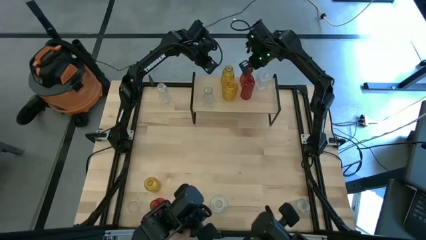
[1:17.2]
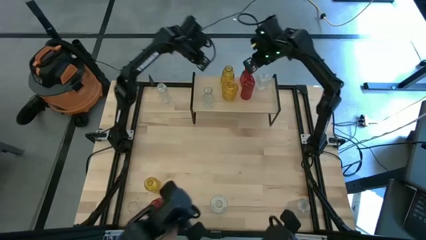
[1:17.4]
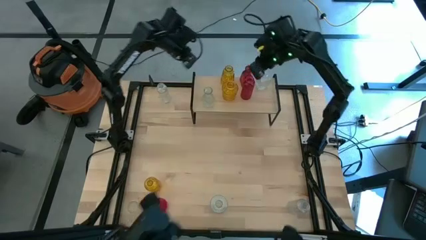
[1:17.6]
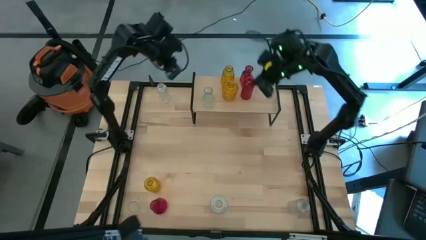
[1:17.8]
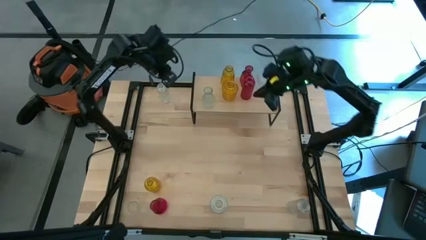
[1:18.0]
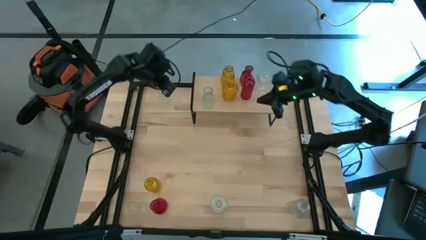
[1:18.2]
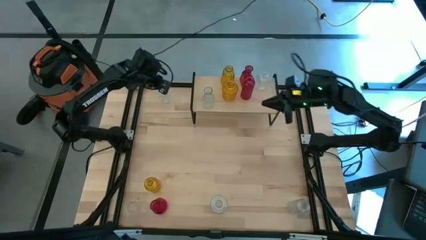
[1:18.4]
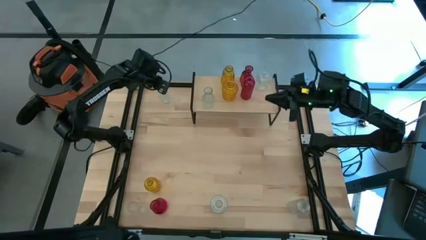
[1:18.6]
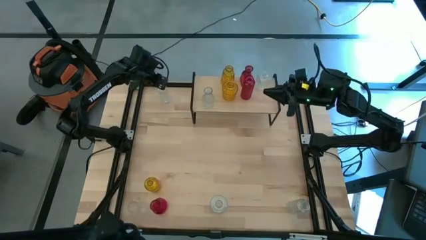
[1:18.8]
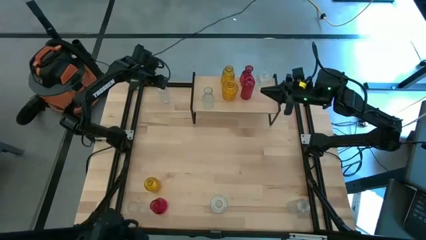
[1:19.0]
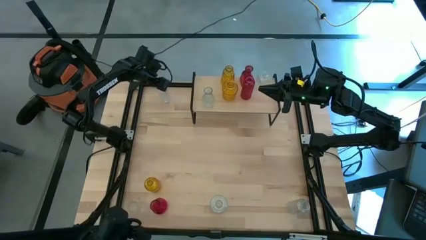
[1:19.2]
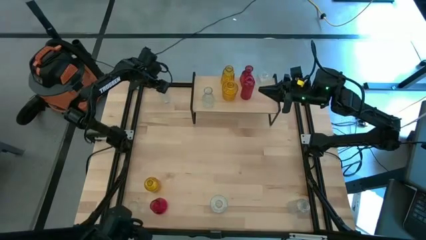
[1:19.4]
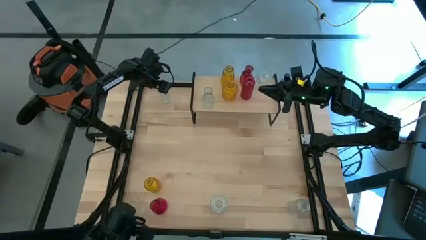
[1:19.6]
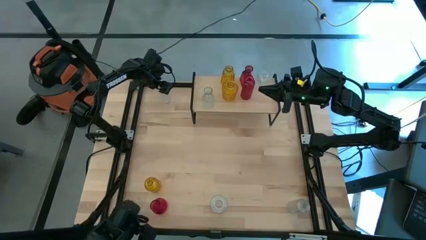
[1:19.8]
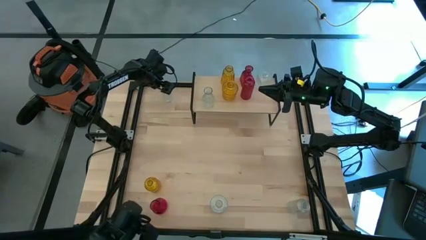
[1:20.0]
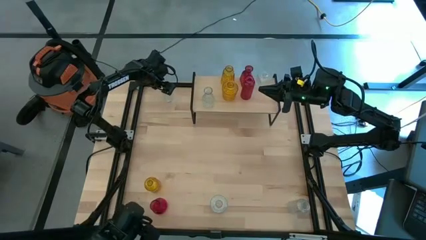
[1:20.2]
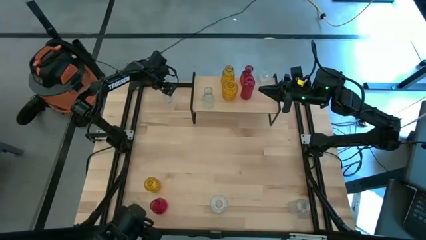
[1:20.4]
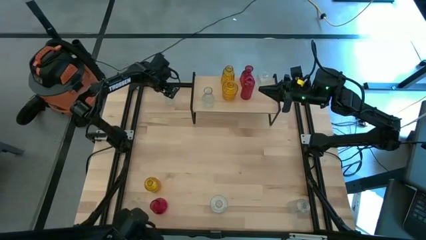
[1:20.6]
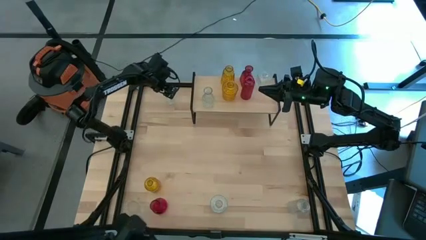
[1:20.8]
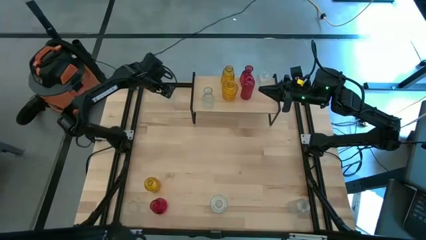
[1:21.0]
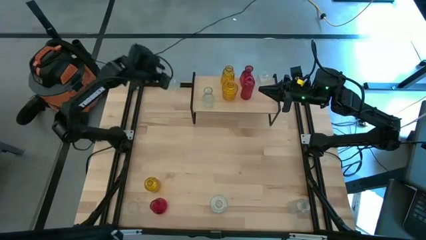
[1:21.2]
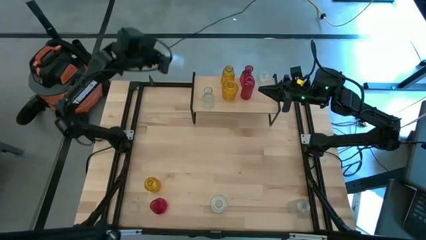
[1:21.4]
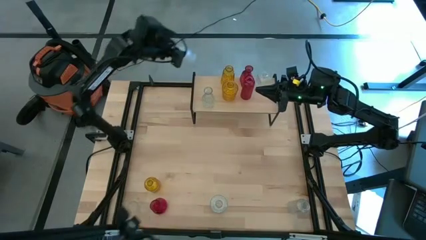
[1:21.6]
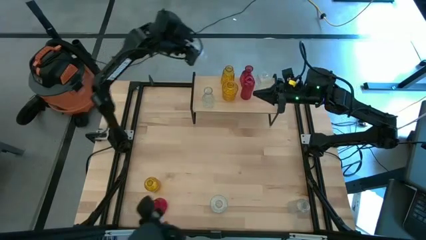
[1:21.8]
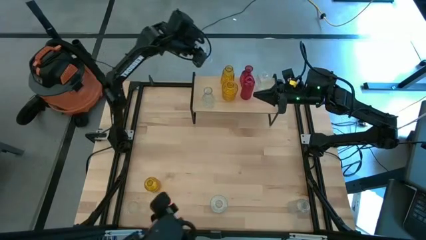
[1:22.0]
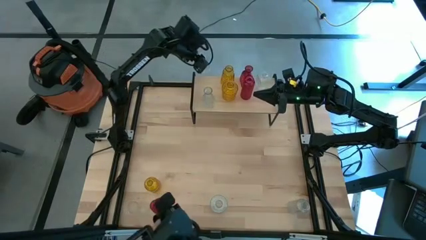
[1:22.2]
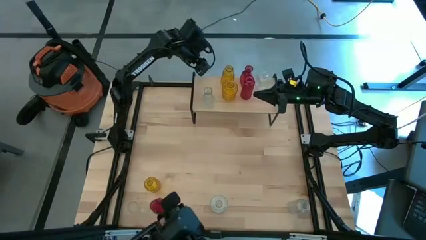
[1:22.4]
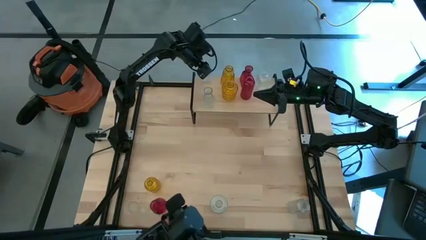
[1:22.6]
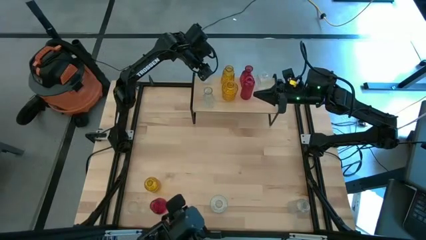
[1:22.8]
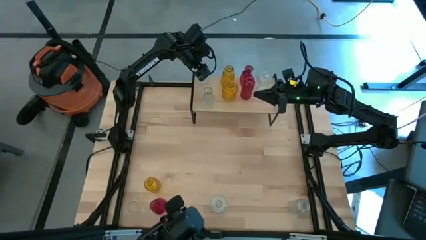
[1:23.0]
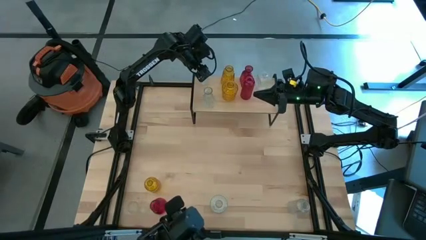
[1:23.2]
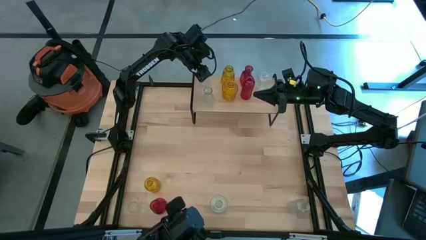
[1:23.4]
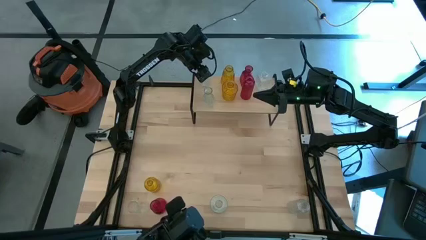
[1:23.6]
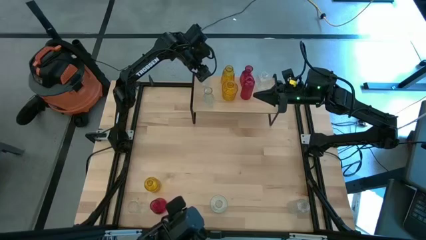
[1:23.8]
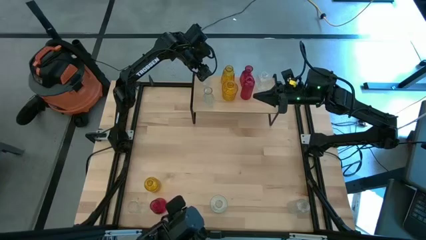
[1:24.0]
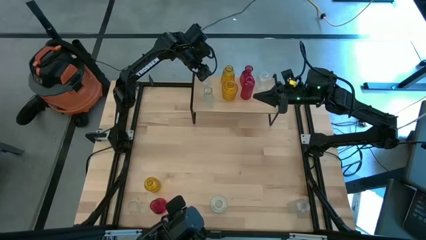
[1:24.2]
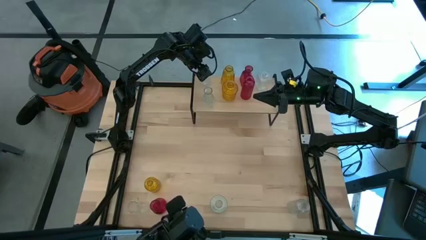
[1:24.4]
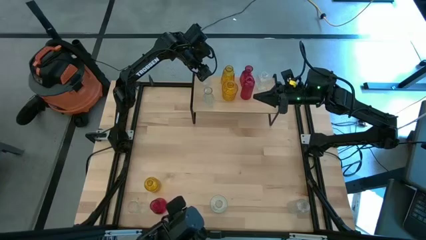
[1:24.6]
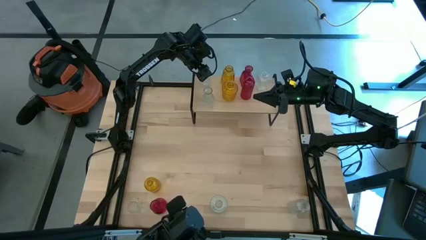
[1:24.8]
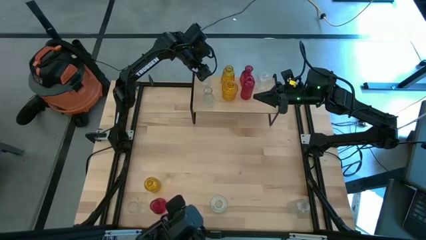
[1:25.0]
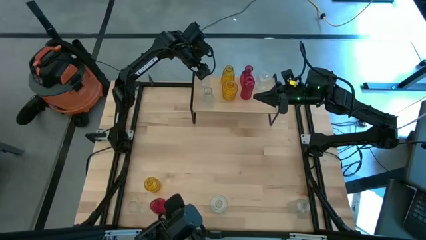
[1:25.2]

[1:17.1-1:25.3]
Task: sort vases onto shelf
Put the transparent vase on the shelf aligned with the other transparent vase

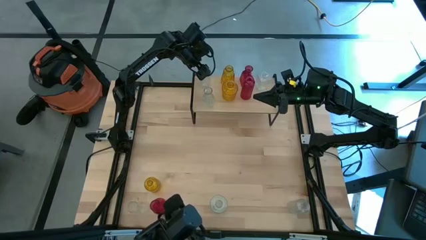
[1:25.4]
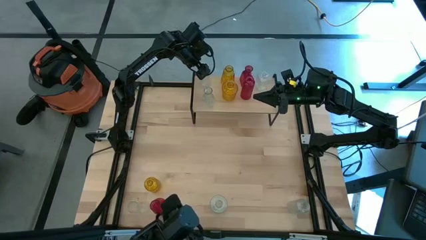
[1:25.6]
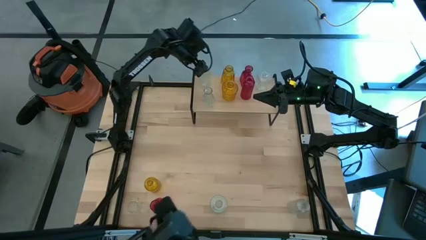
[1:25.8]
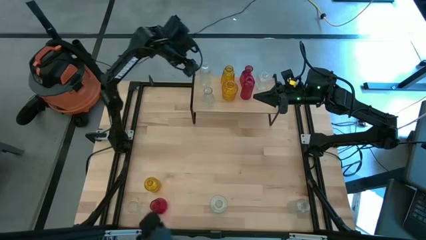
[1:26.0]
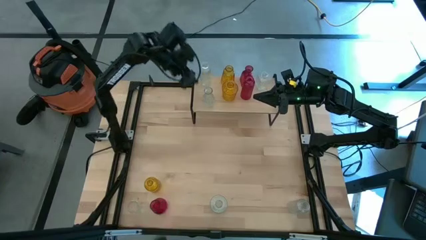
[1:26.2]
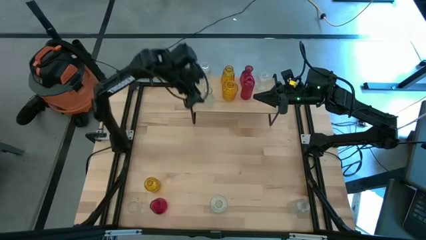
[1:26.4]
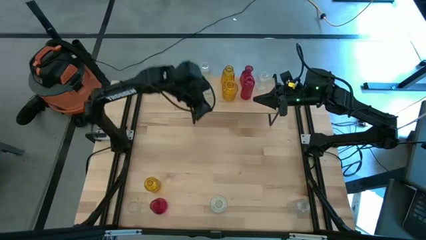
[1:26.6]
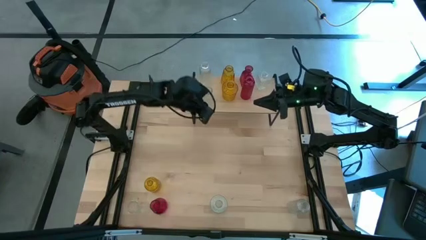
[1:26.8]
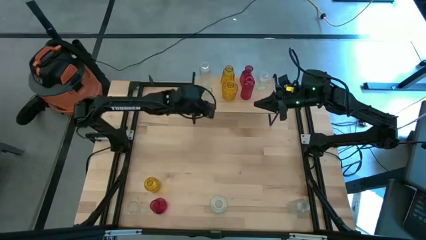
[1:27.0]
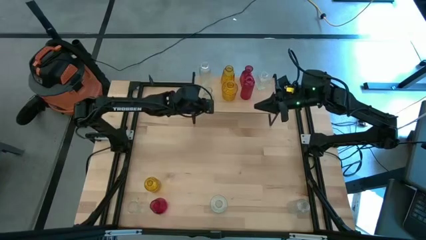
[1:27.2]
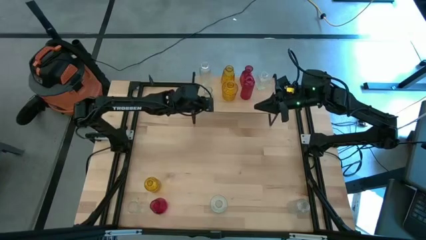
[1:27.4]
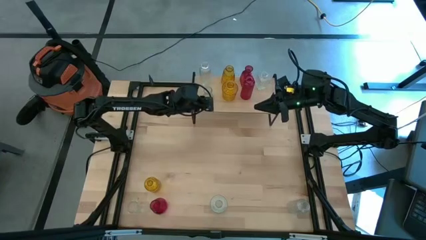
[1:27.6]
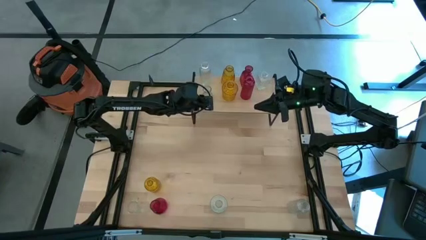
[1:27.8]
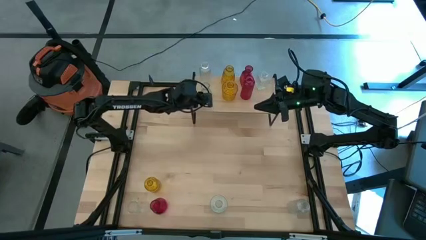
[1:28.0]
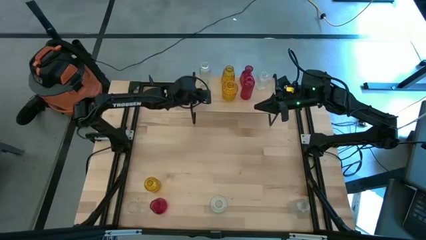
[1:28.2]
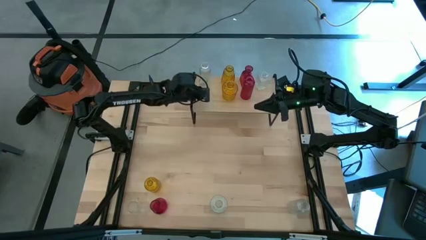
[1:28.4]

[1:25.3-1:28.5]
Adjust the transparent vase

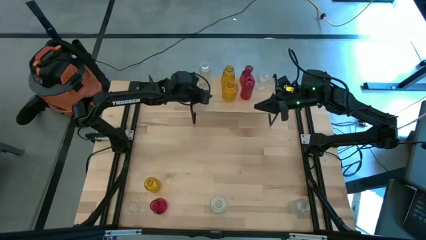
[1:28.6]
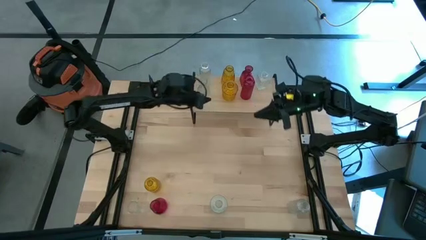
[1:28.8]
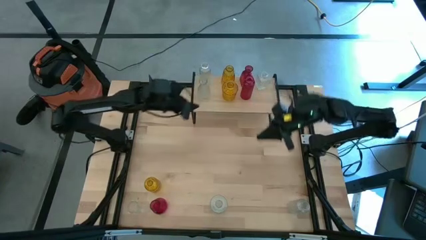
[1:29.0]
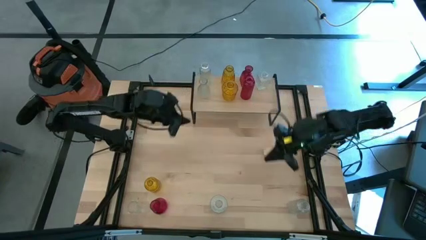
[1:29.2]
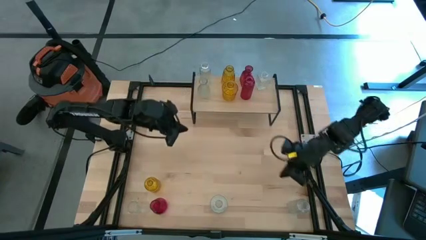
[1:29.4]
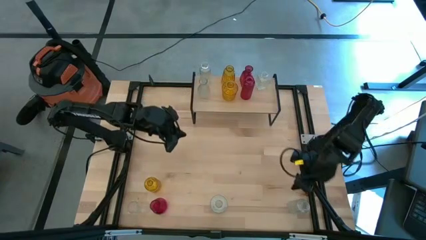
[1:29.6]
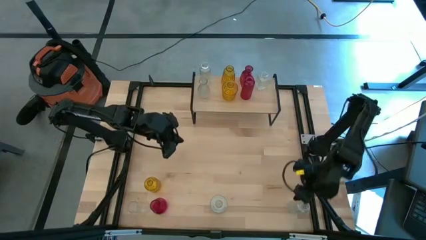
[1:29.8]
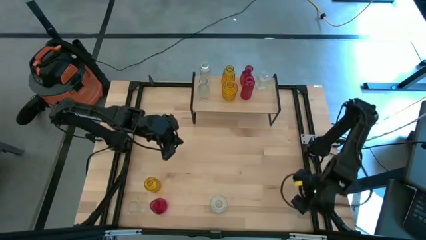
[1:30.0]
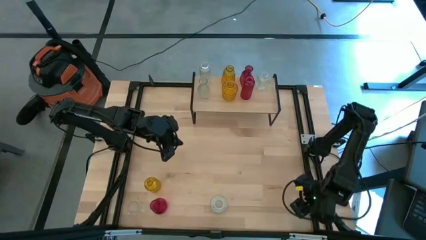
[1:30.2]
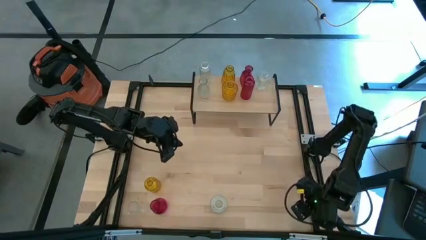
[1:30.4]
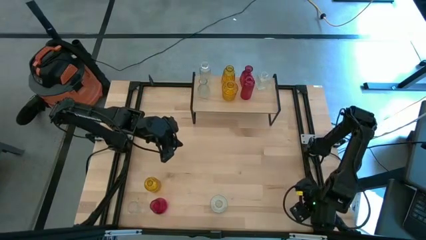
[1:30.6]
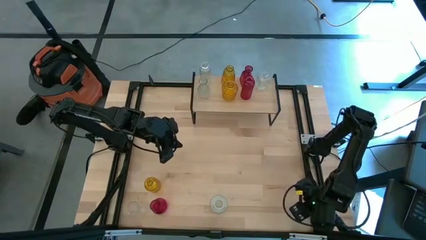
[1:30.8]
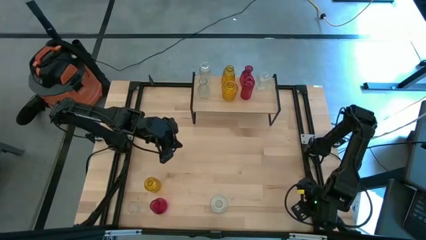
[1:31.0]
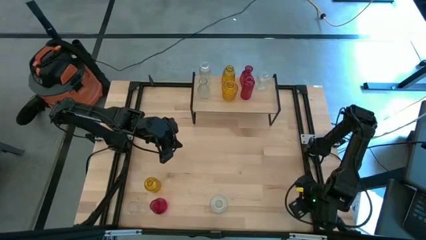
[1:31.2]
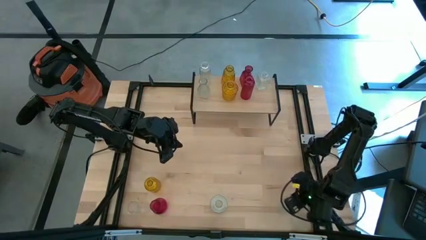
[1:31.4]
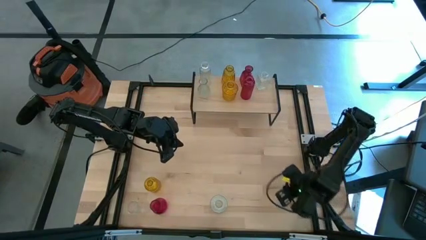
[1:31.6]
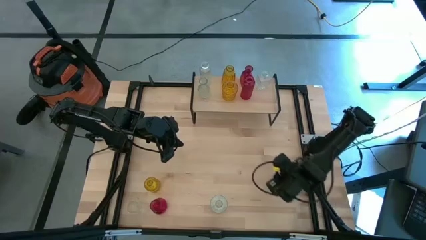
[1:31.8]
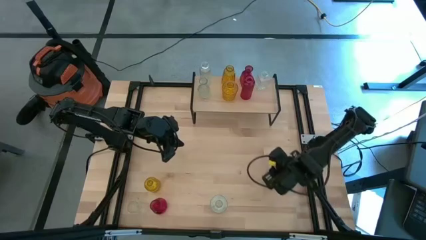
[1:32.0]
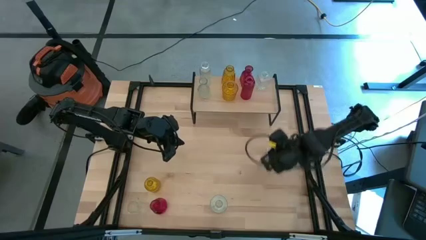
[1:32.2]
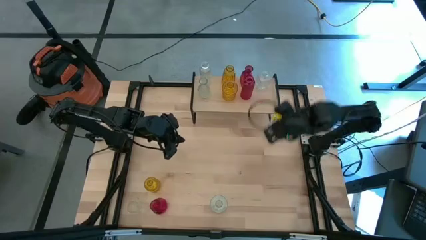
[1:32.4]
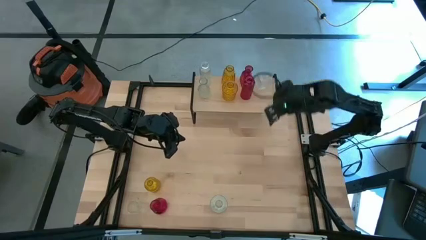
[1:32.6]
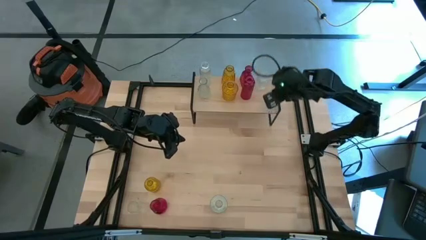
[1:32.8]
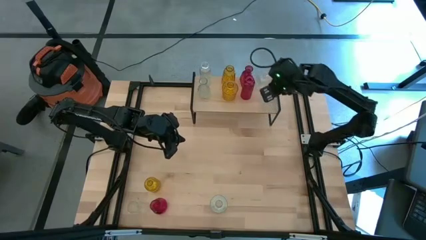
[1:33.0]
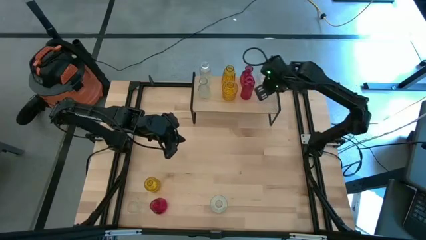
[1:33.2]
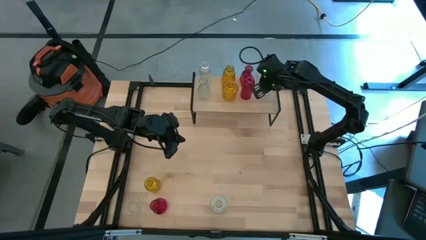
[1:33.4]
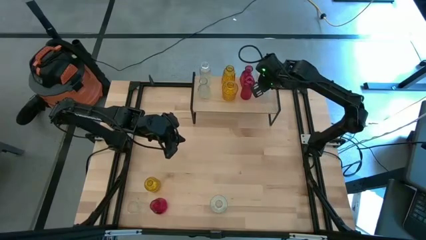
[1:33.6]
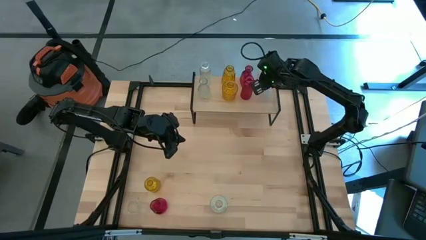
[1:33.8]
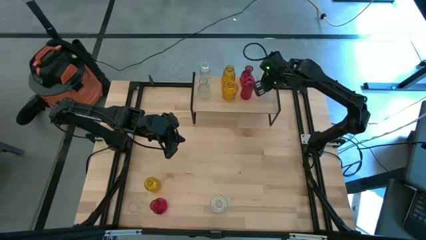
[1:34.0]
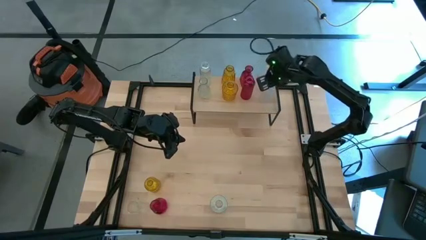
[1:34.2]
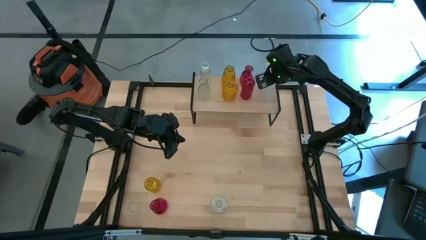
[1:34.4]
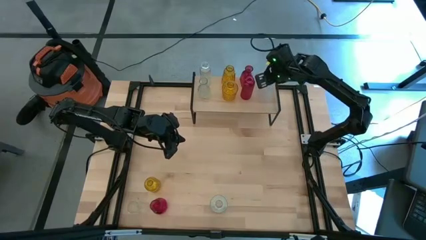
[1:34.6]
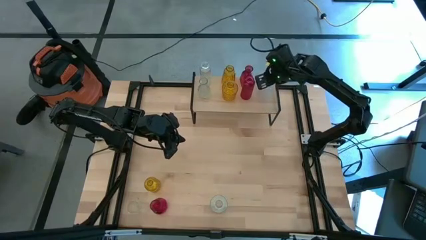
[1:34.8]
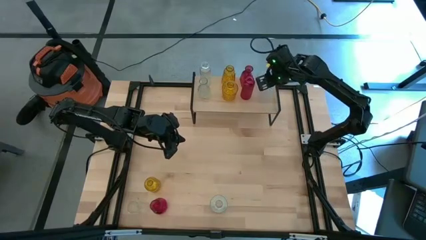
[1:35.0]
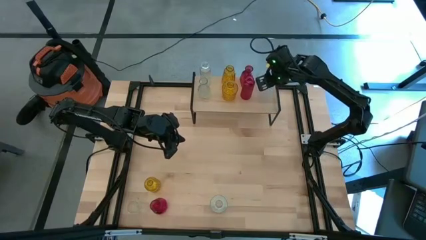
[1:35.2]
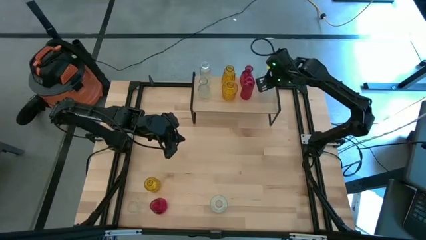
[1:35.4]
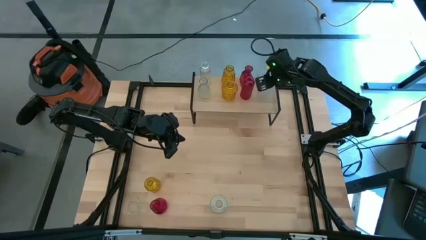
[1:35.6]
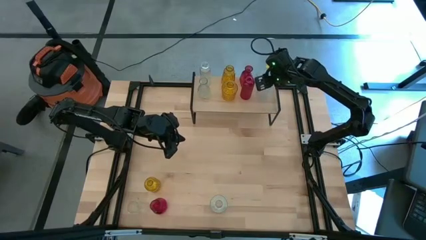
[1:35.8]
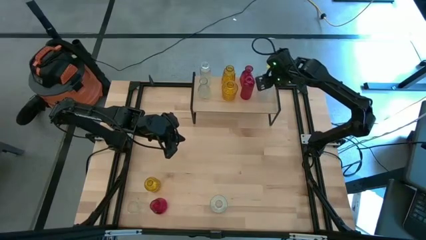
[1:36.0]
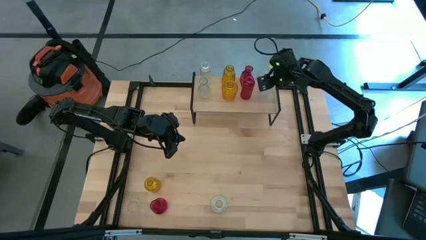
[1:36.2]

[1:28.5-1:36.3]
Put the transparent vase on the shelf aligned with the other transparent vase
